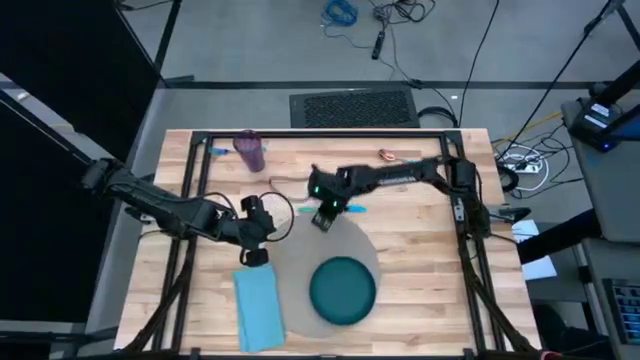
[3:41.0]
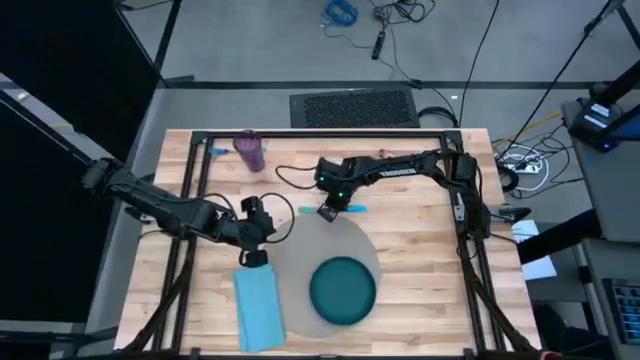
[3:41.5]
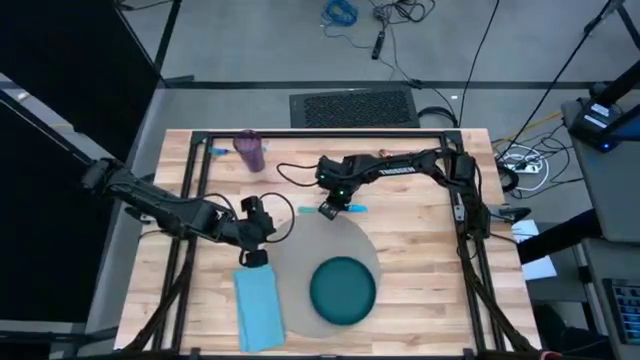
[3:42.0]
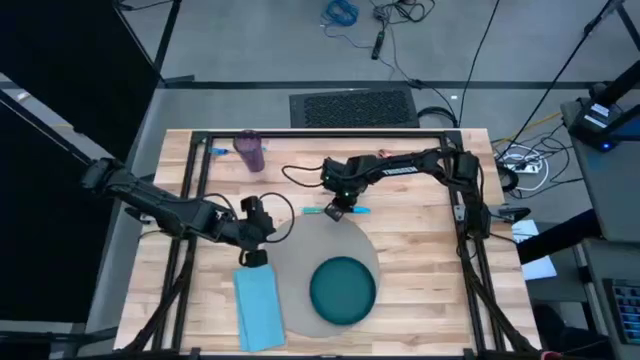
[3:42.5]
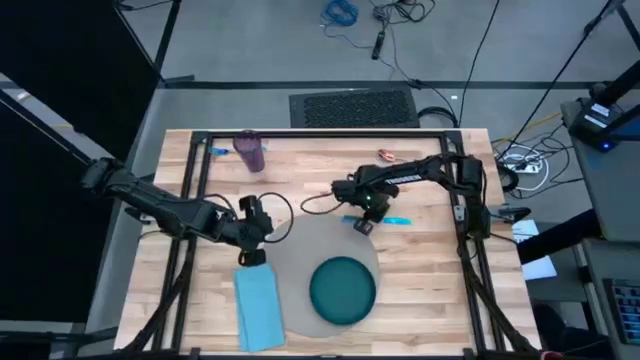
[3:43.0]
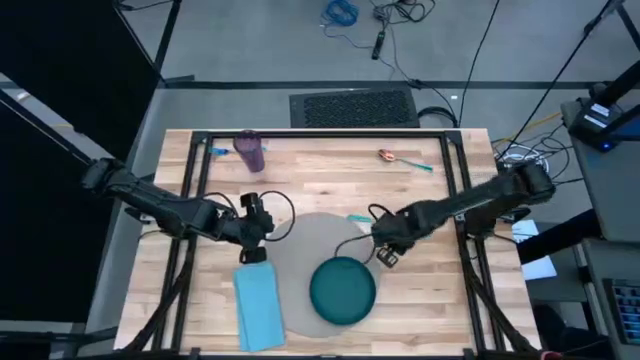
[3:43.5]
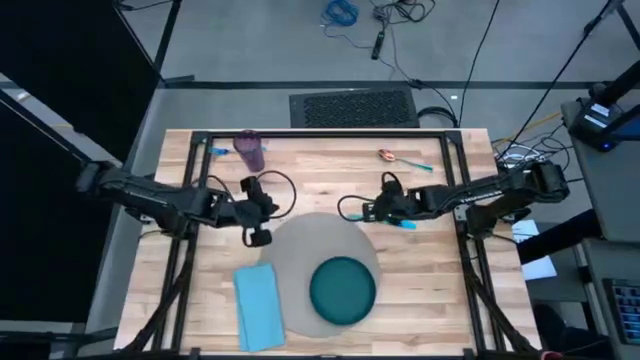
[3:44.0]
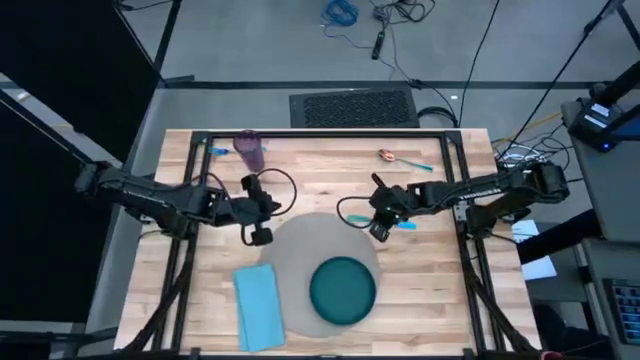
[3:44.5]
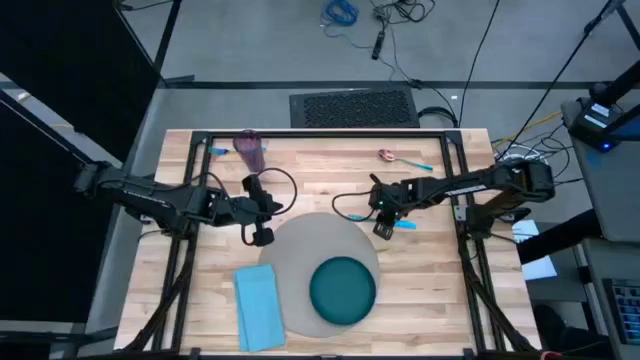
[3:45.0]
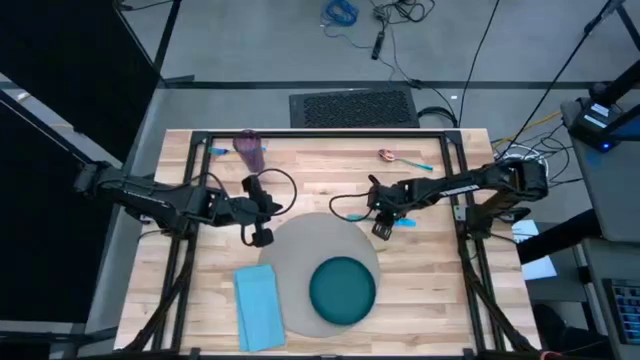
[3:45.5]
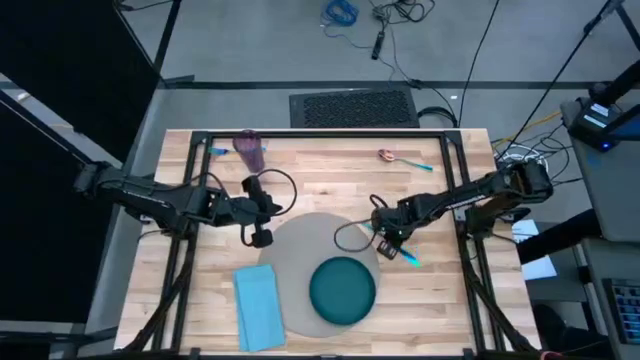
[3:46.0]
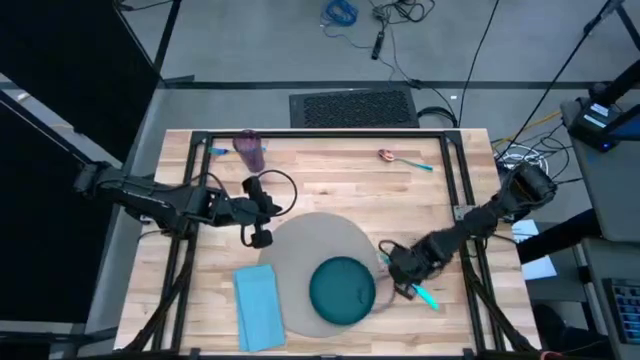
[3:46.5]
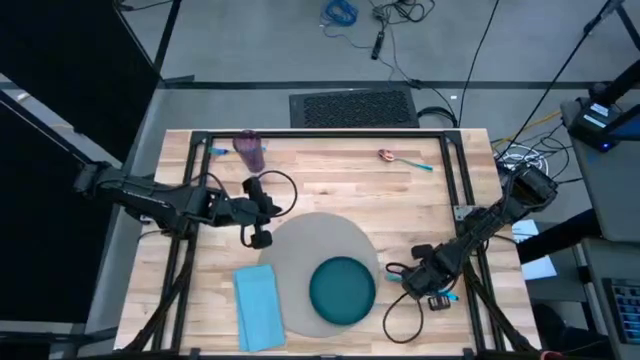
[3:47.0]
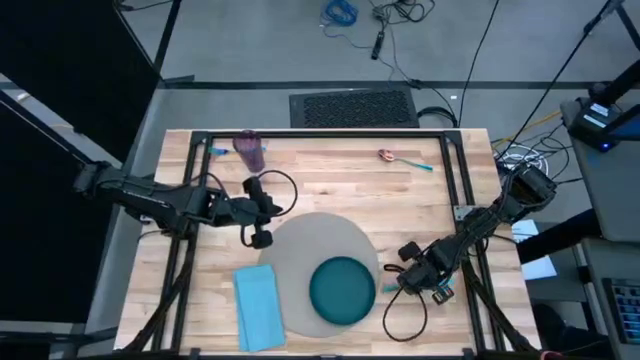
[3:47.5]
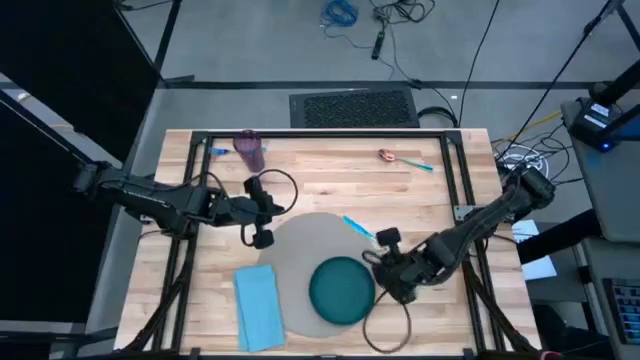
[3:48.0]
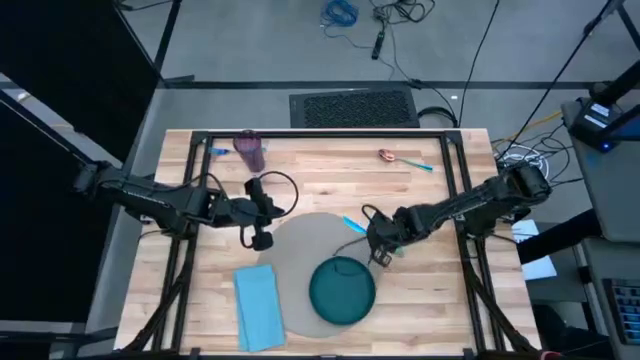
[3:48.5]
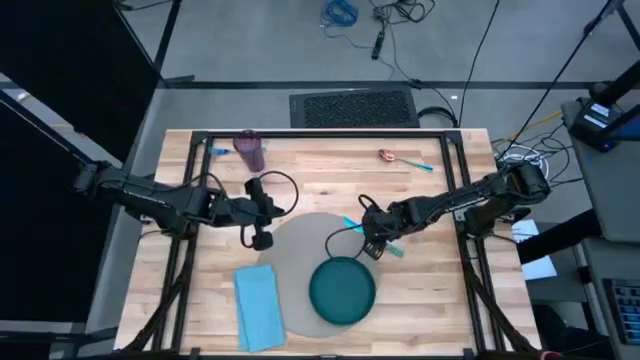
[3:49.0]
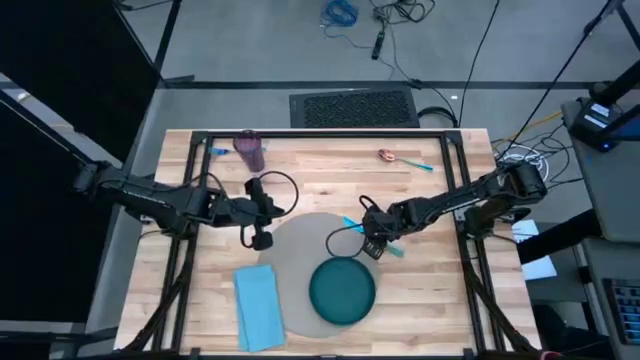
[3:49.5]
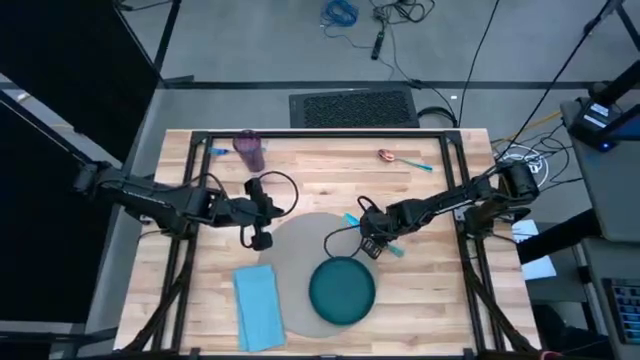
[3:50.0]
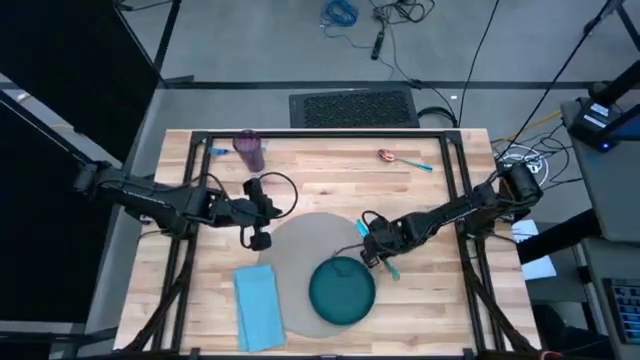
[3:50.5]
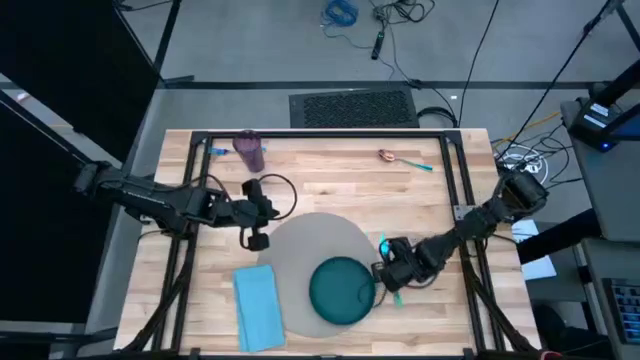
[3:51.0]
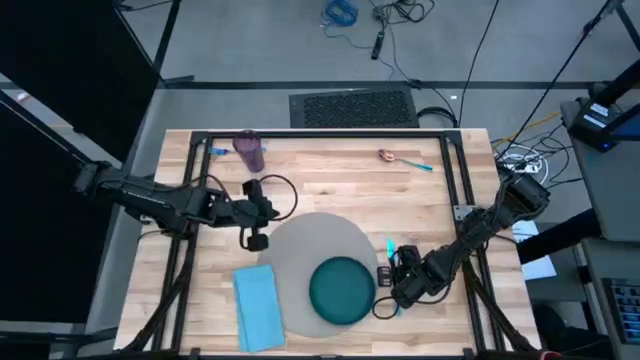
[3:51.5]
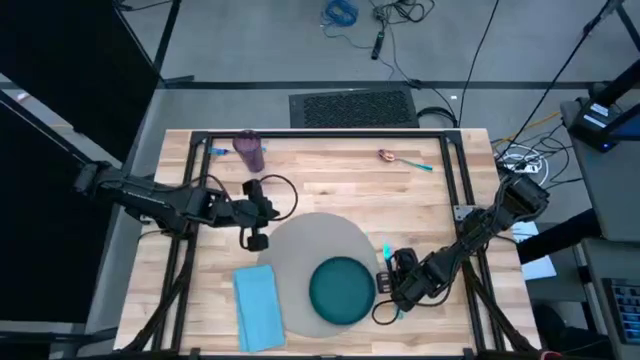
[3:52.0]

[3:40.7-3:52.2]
Task: Set table place
Move the iridescent knife to the bottom right of the table

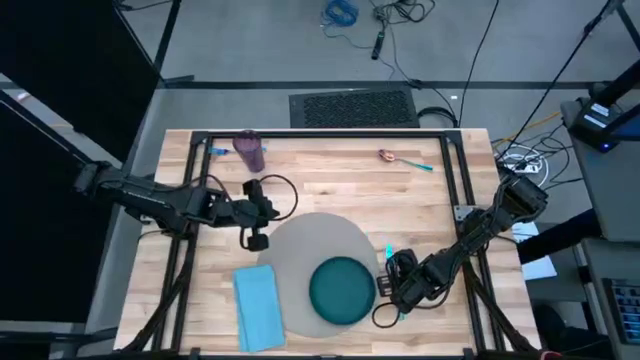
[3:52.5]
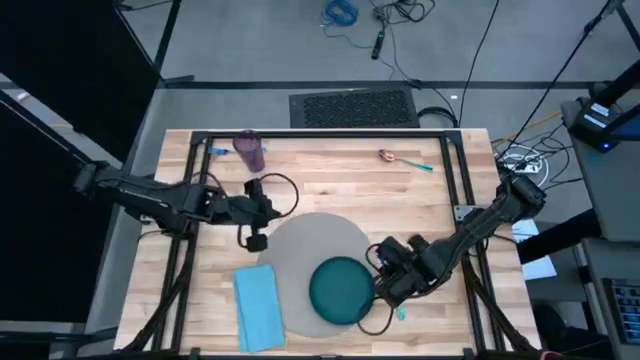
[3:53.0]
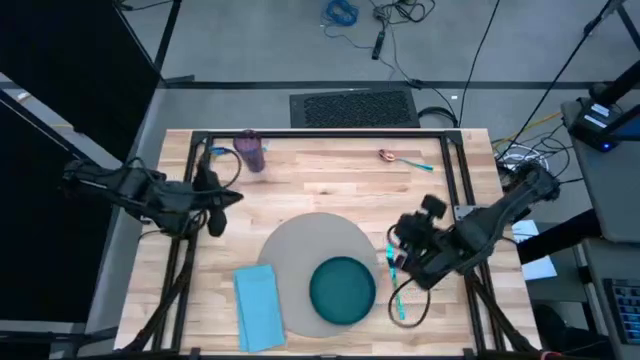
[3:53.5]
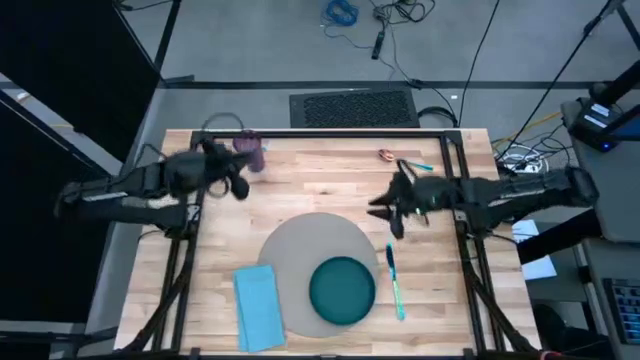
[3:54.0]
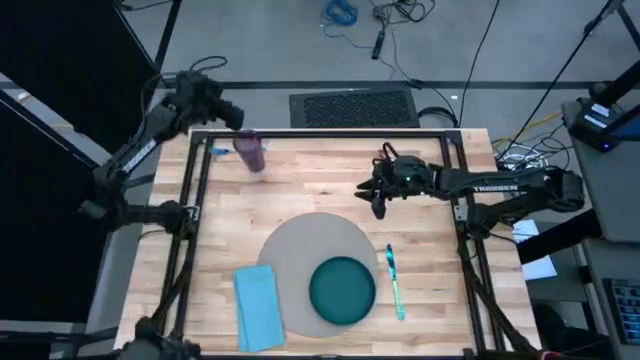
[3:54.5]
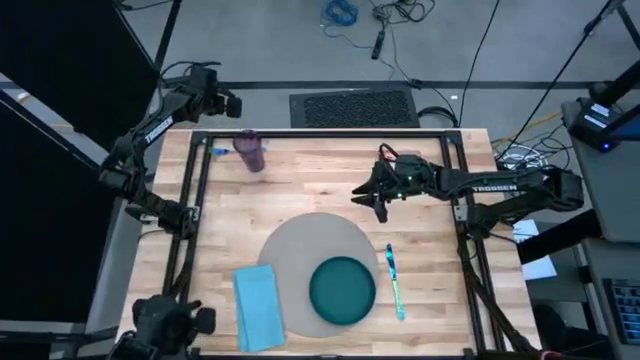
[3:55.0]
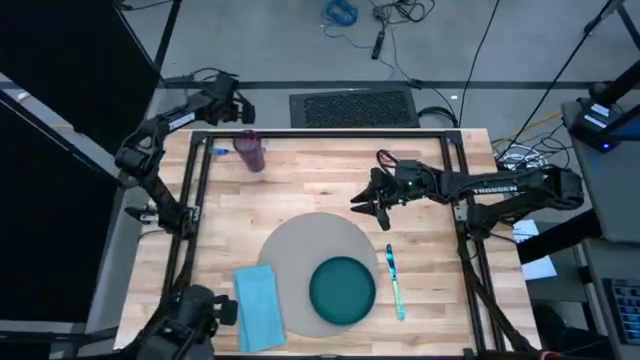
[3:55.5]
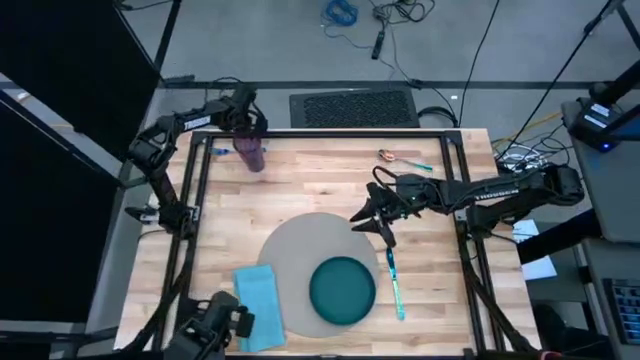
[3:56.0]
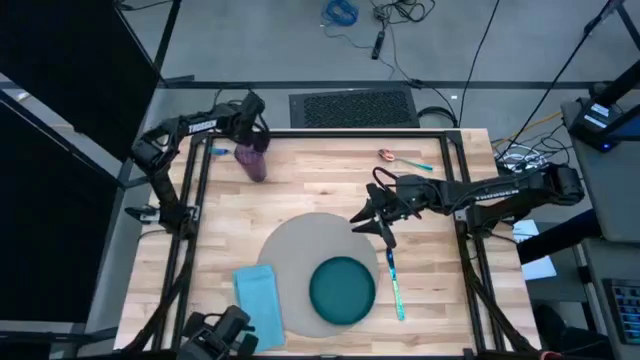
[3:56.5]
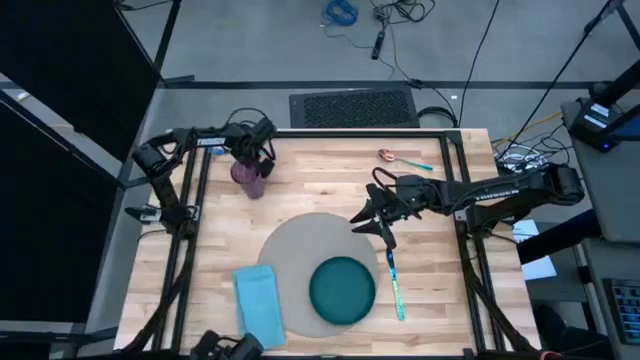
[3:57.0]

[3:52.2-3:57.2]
Adjust the purple cup

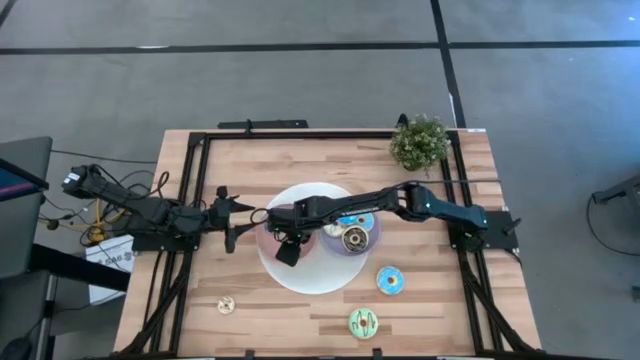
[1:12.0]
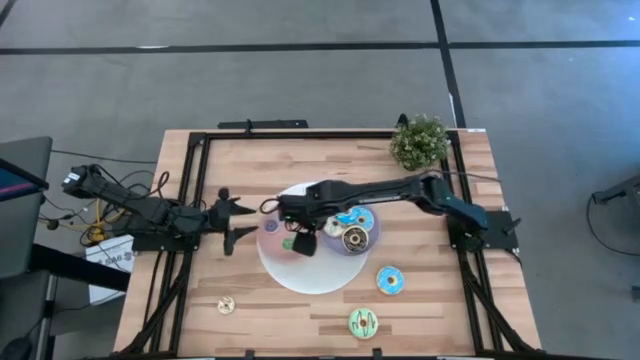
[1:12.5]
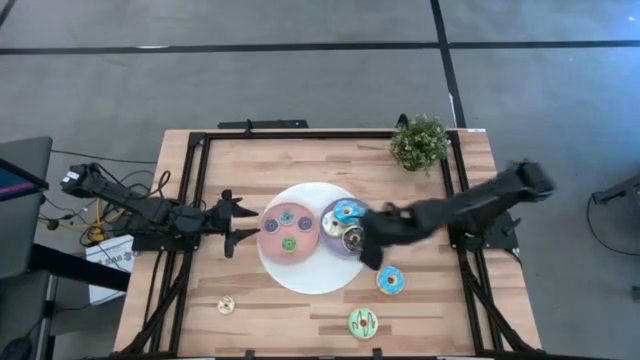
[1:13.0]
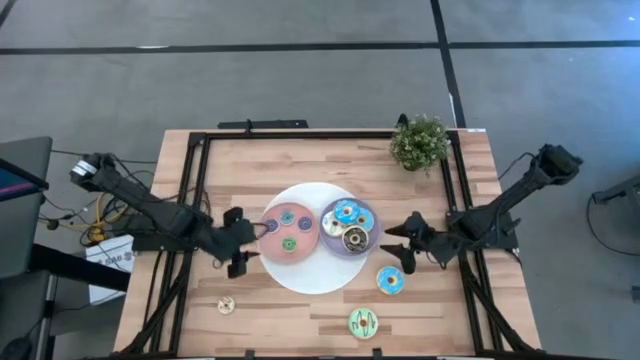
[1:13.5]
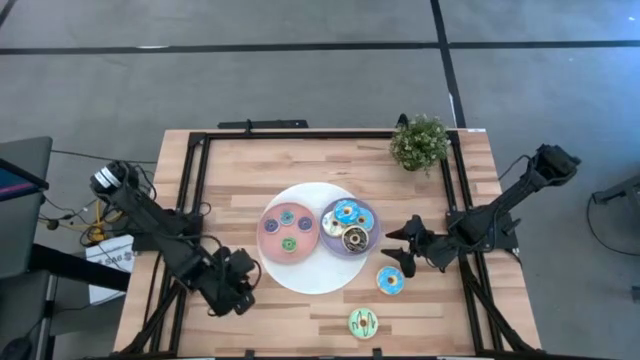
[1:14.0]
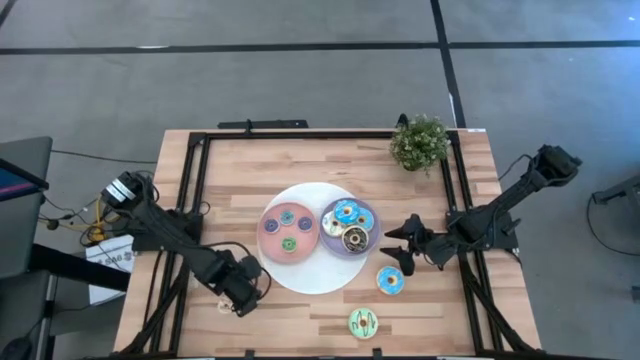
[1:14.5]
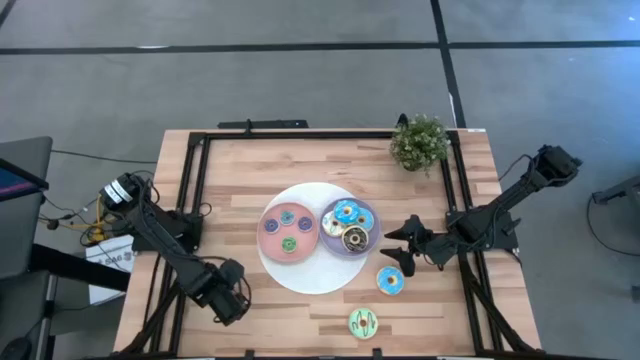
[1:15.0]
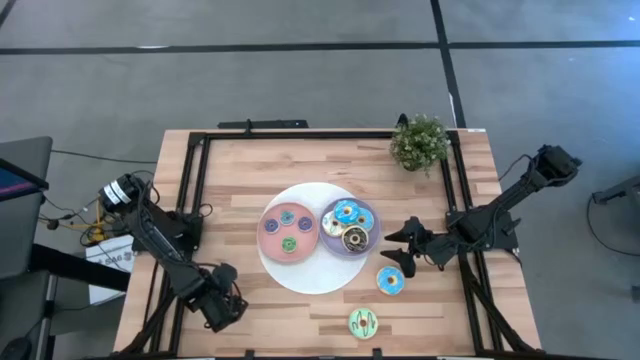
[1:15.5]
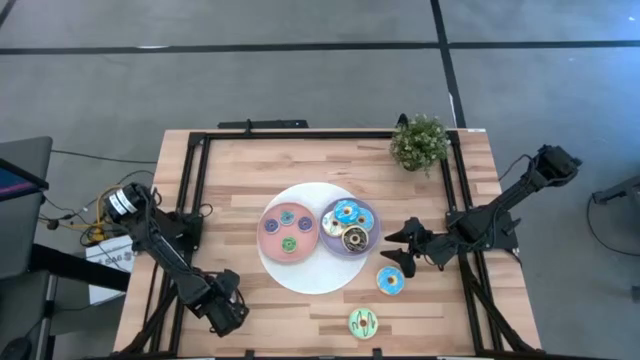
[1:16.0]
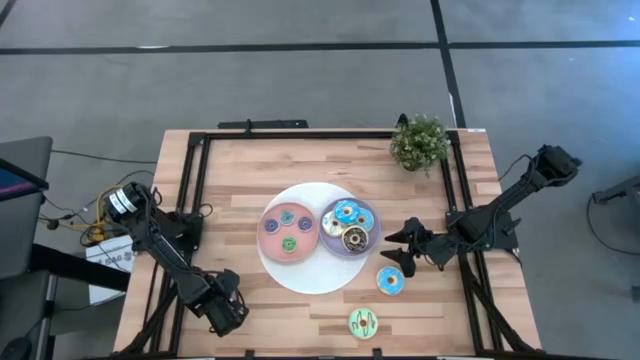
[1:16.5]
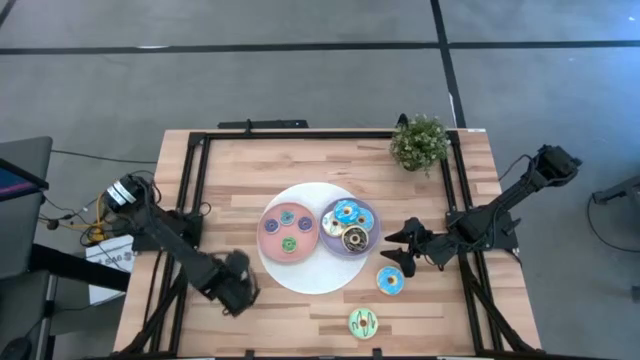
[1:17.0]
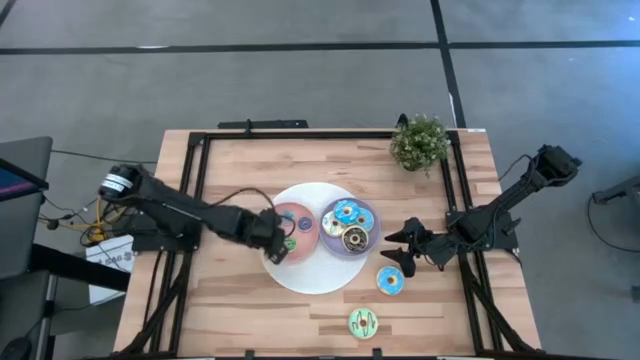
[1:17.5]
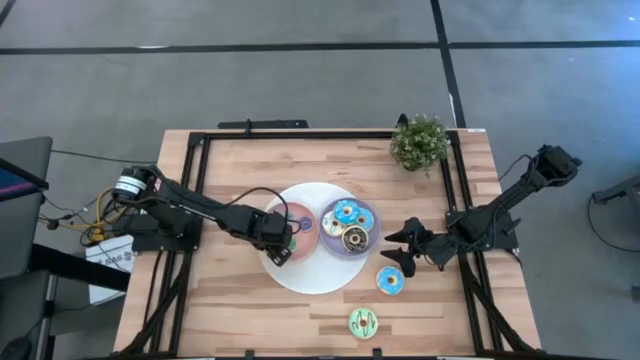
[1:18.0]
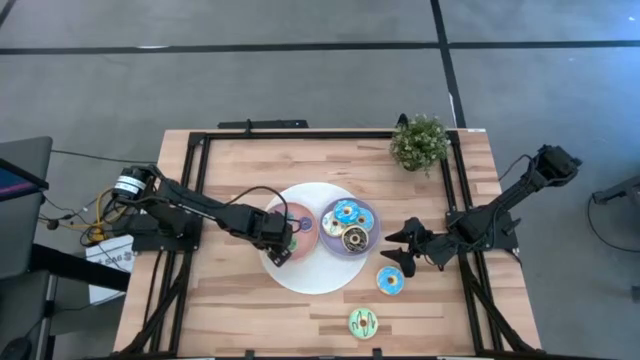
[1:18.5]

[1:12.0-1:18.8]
Task: Pick & Place donuts
Put the small white donut on the pink plate
